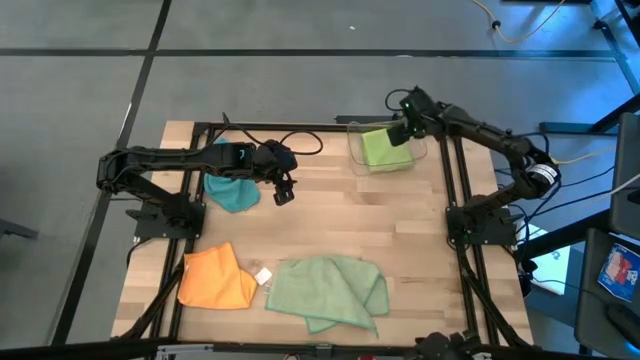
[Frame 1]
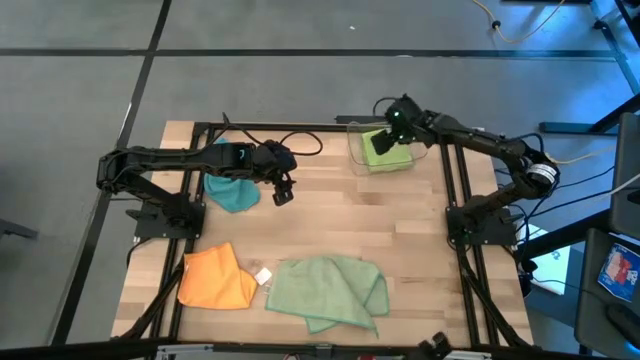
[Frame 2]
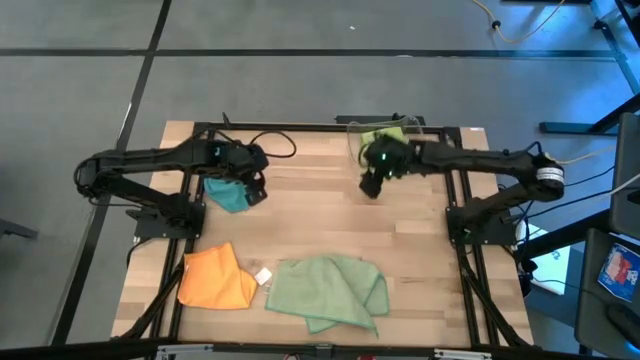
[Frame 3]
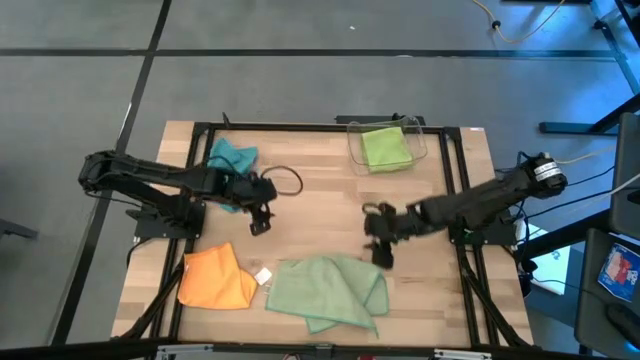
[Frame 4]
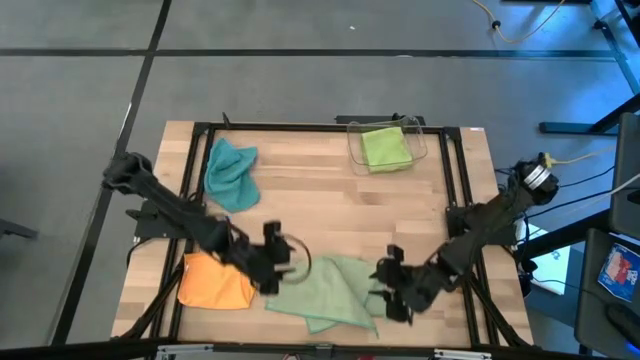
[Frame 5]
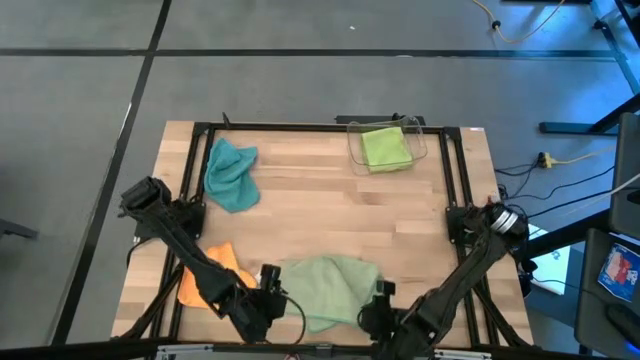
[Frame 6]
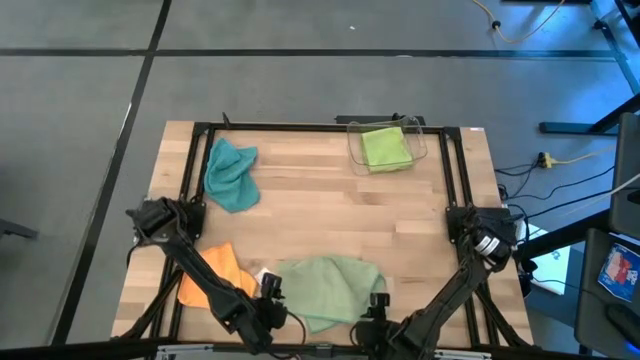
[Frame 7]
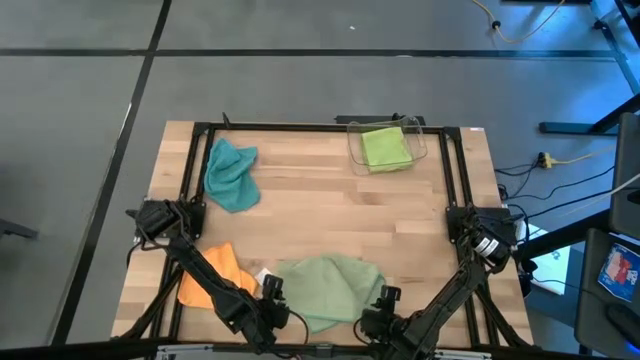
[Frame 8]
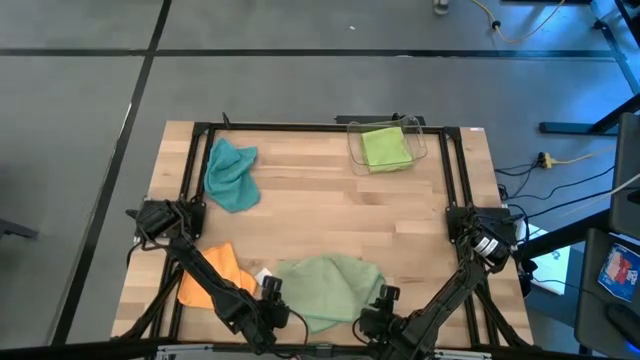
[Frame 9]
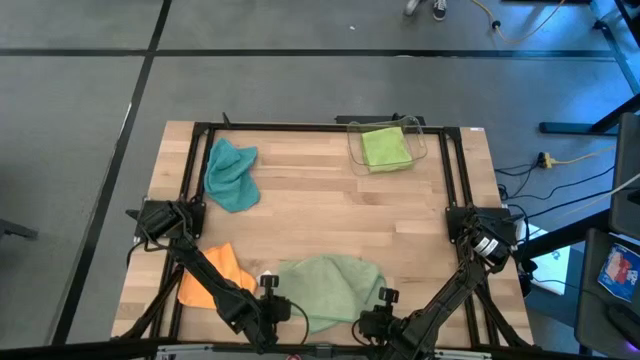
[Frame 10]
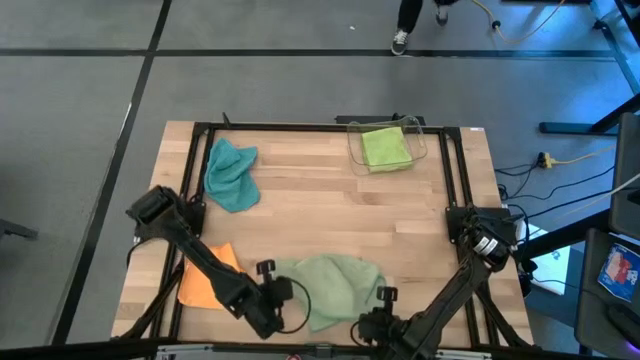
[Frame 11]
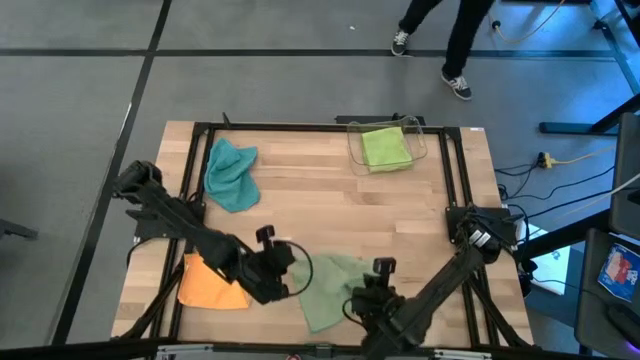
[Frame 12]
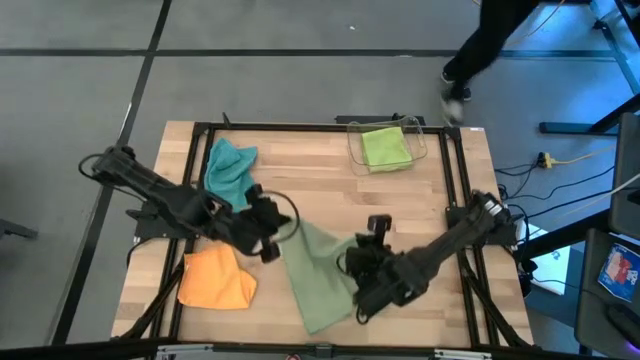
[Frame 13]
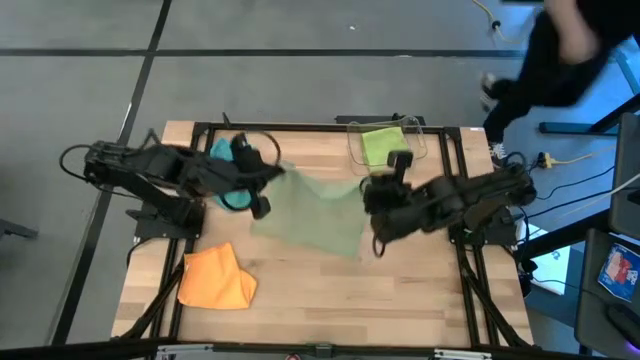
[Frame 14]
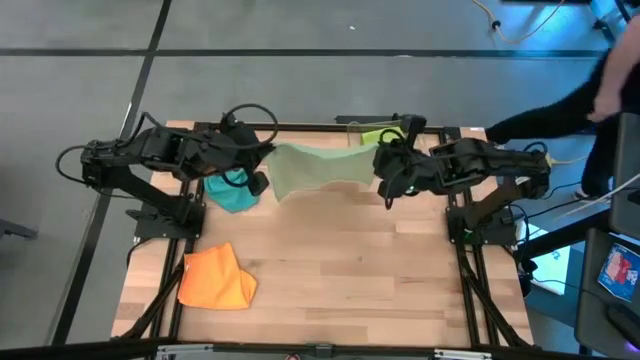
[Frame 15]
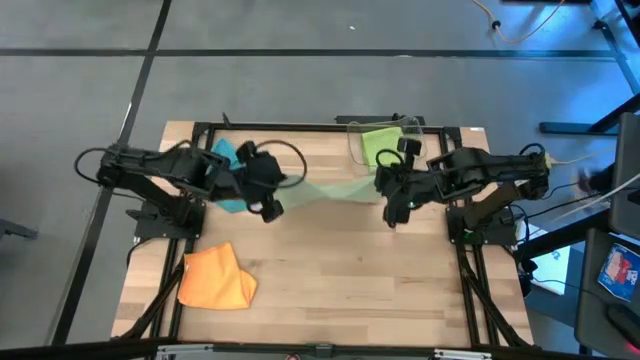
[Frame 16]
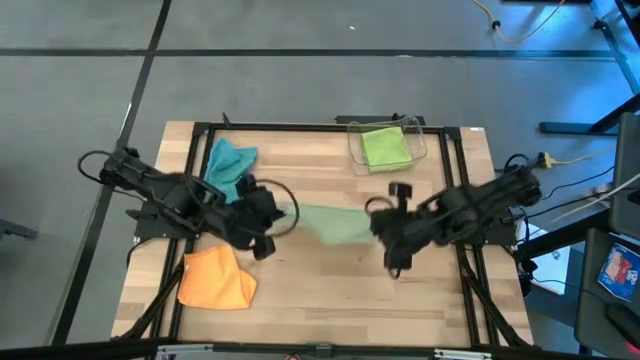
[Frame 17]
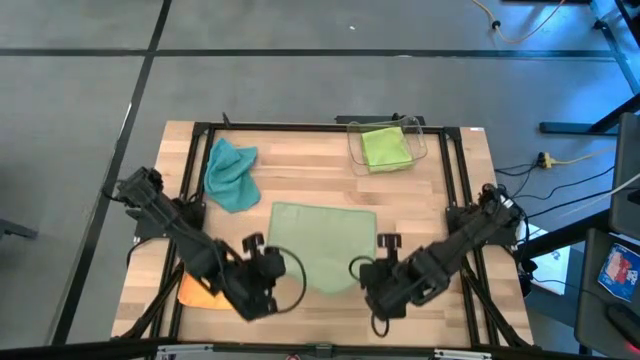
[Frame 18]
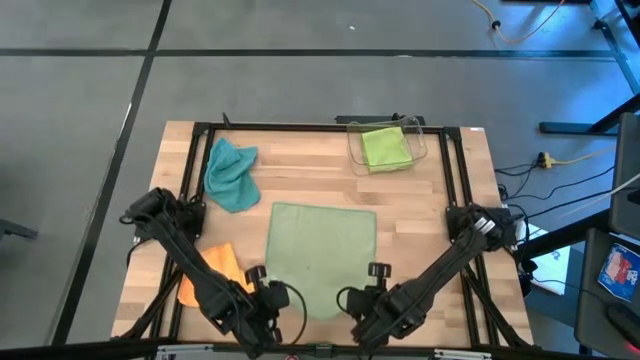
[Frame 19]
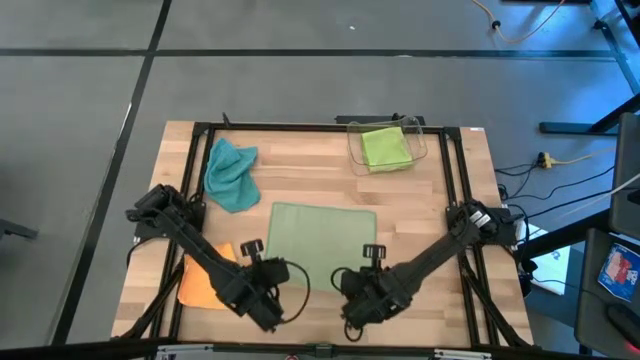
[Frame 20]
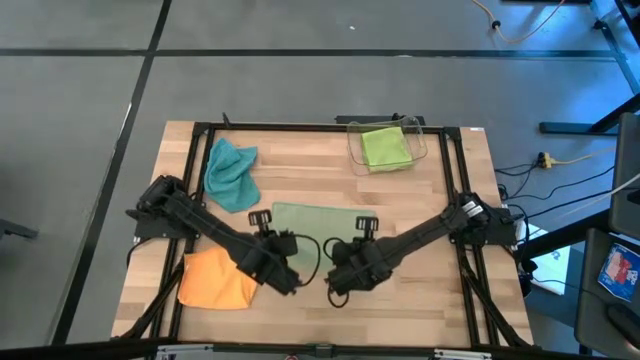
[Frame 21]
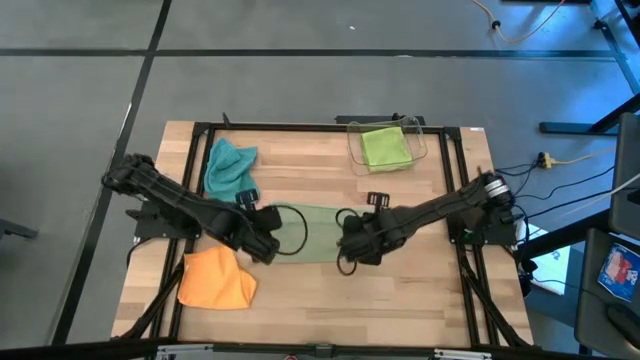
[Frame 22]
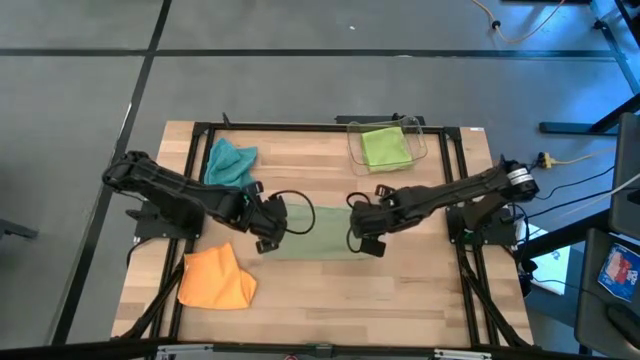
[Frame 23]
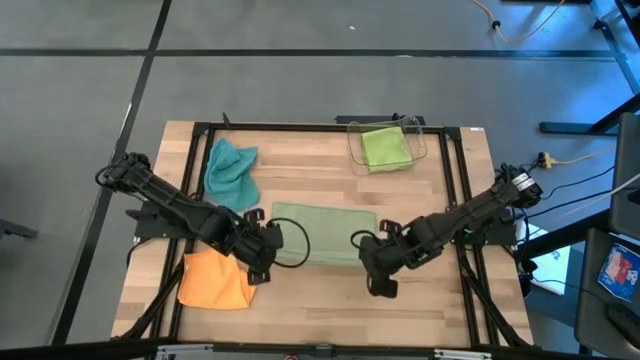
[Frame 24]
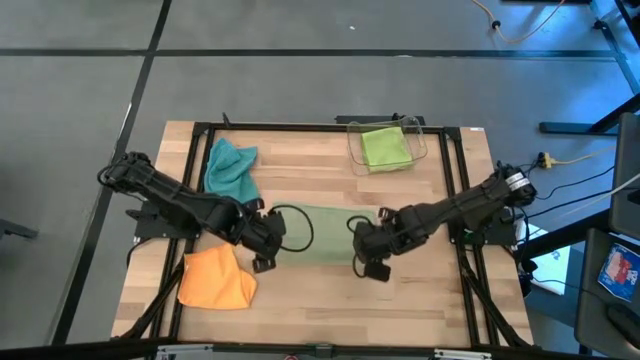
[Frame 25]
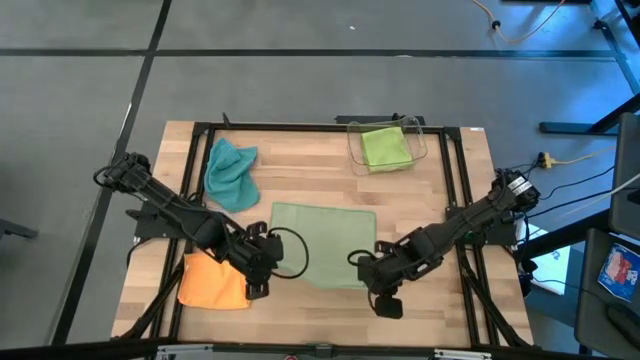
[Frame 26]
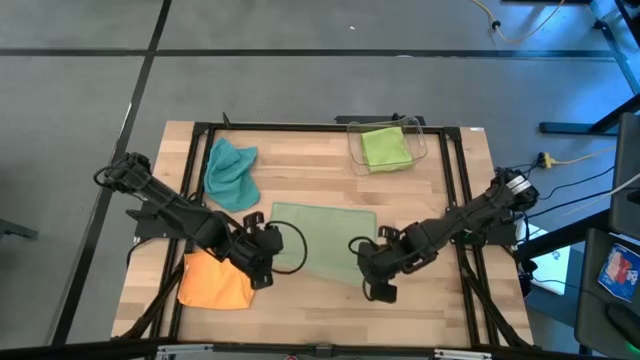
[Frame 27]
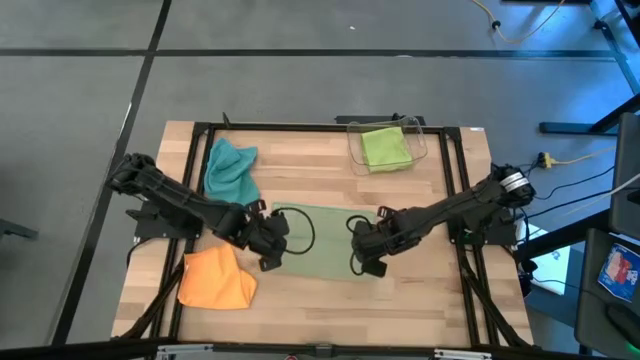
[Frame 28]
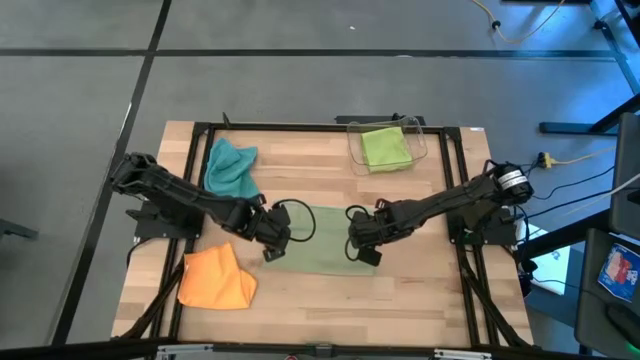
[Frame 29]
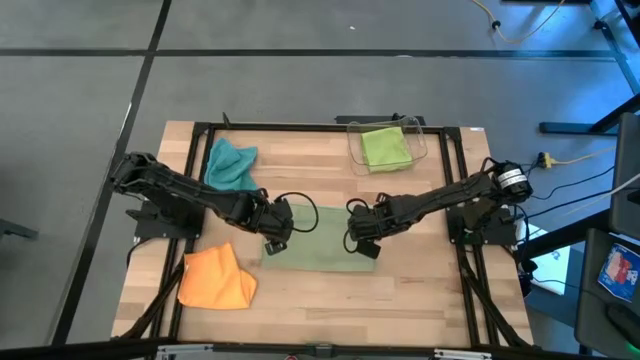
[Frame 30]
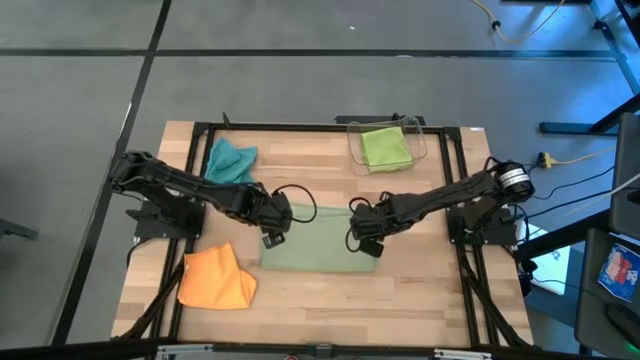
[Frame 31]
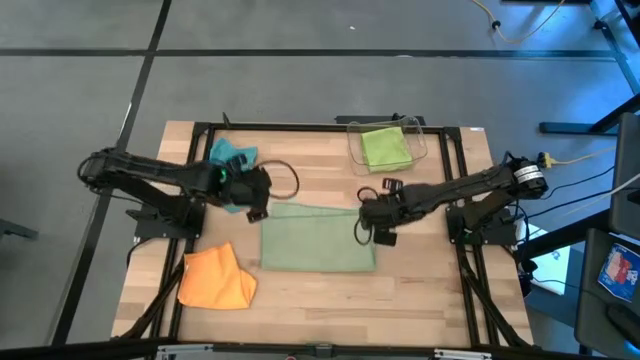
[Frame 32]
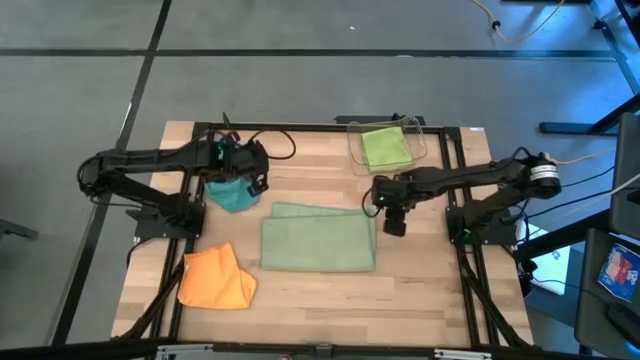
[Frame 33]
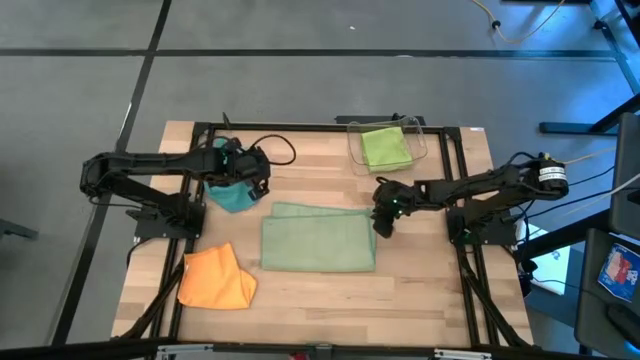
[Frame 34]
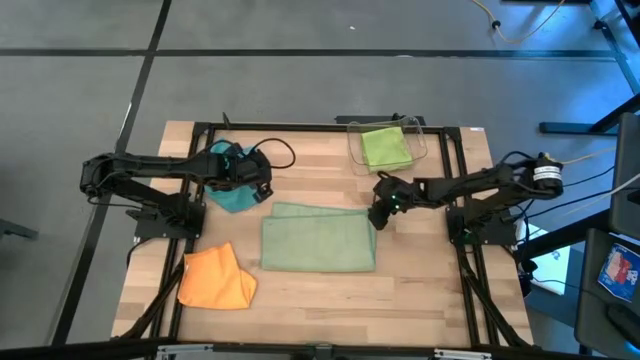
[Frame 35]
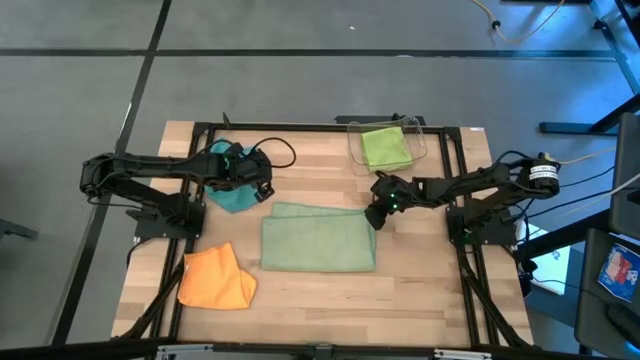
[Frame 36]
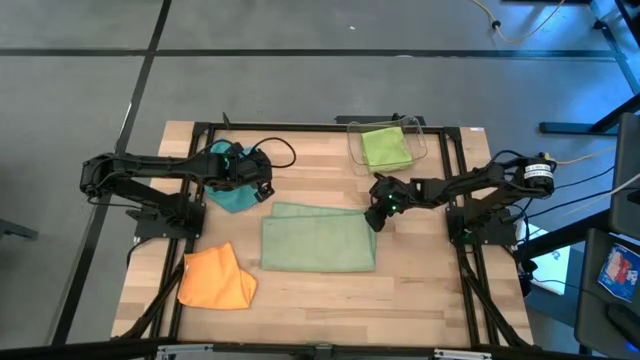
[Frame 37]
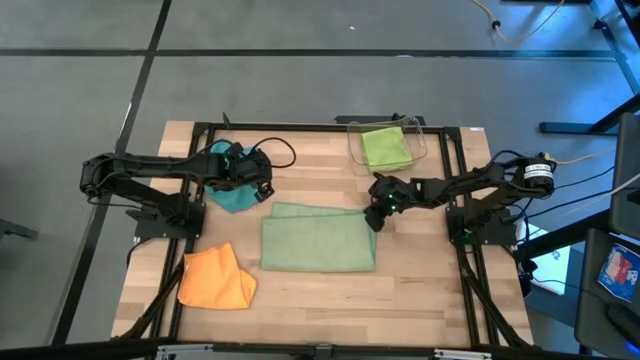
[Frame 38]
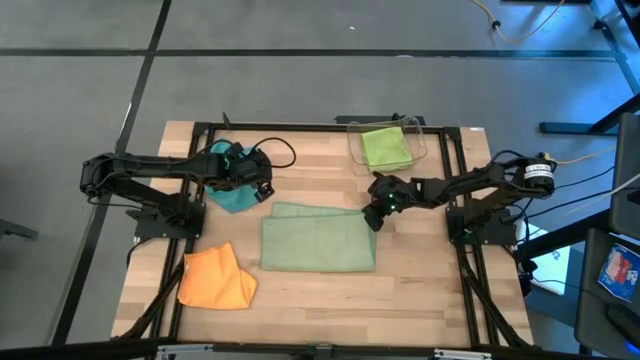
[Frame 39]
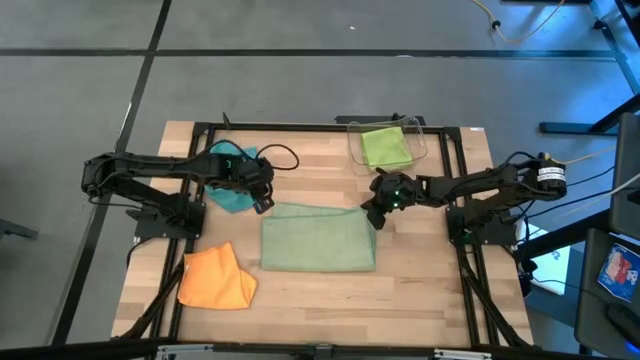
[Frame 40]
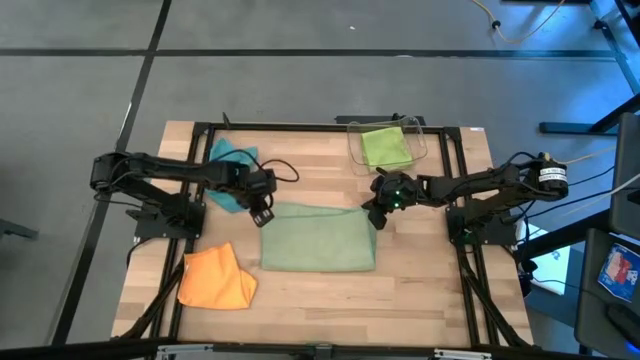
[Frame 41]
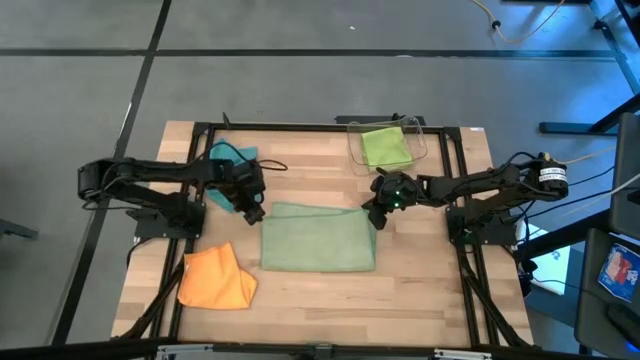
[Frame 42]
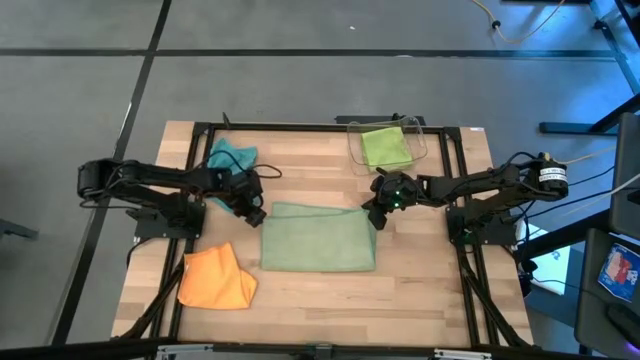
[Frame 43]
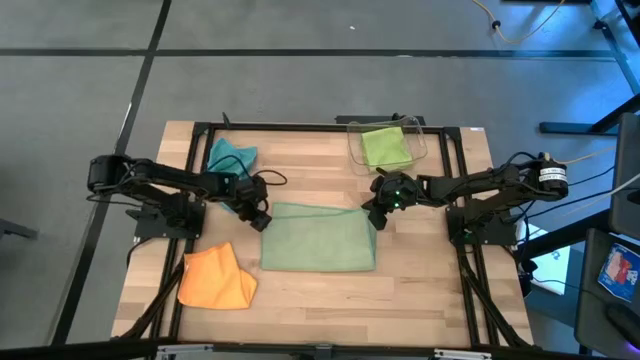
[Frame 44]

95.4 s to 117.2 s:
Task: Fold microfiber towels
Fold the green microfiber towel
